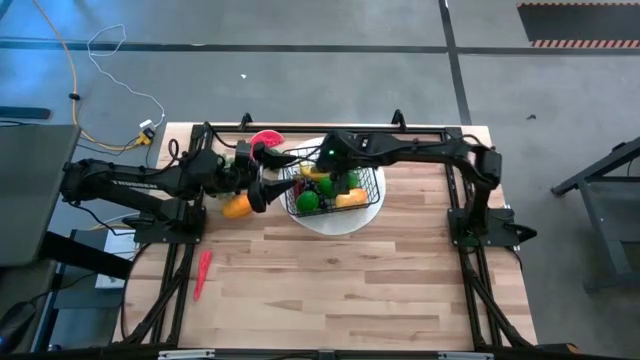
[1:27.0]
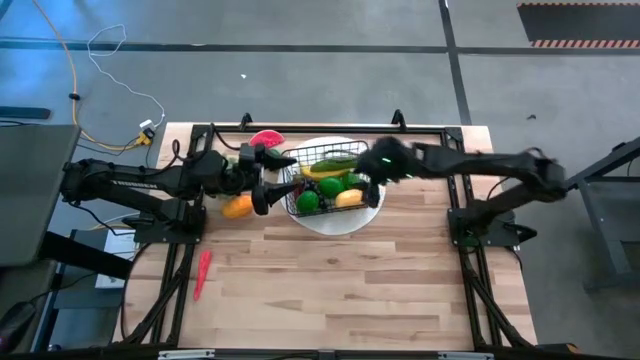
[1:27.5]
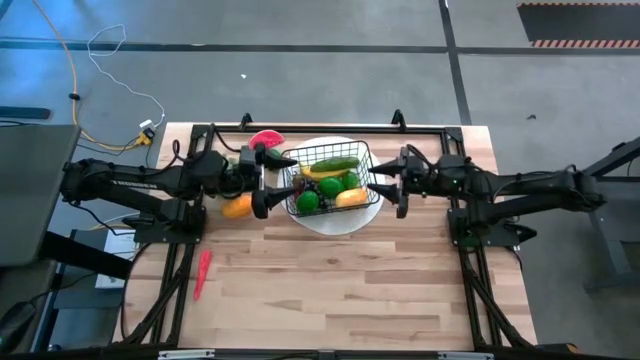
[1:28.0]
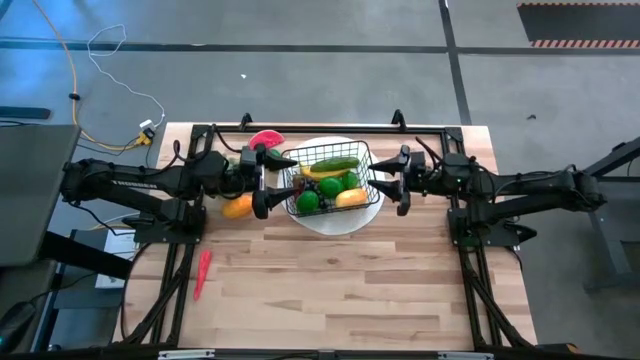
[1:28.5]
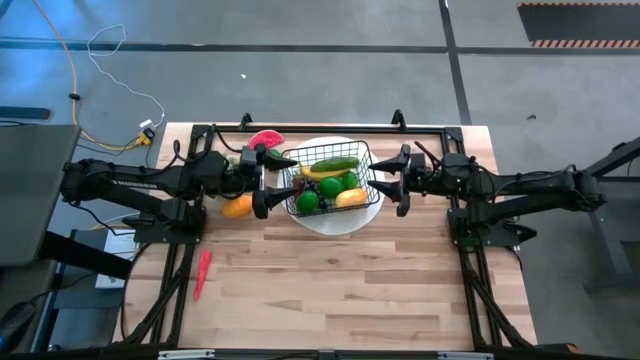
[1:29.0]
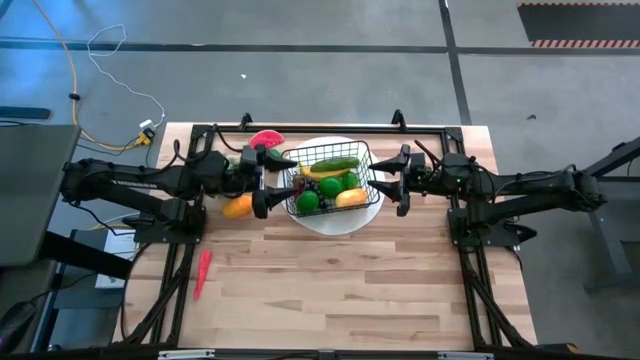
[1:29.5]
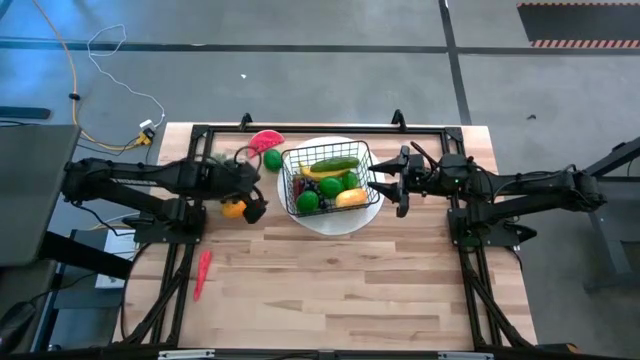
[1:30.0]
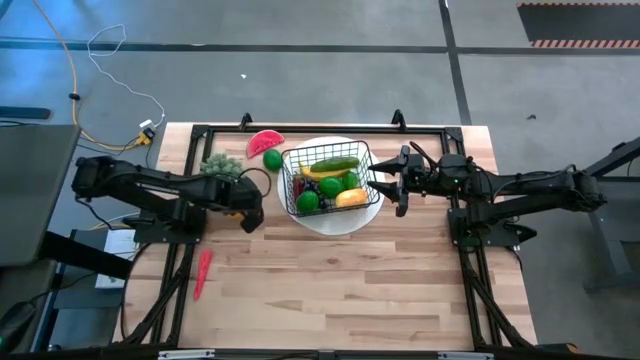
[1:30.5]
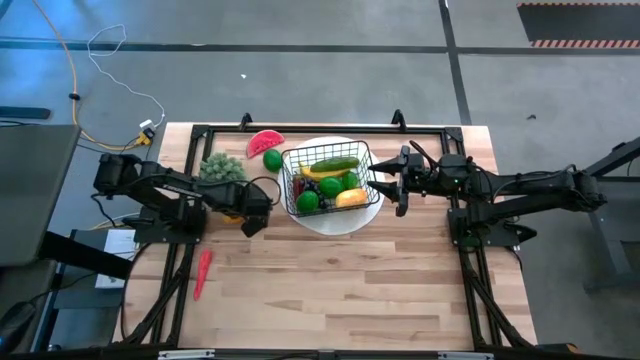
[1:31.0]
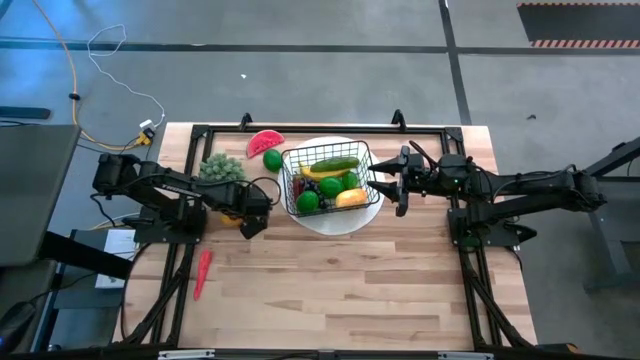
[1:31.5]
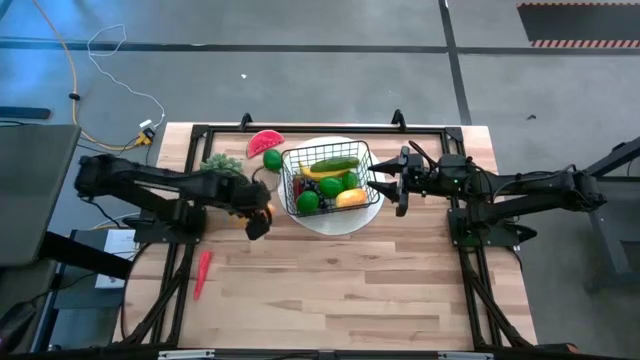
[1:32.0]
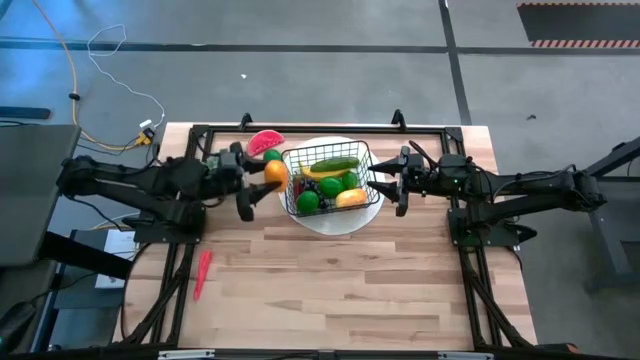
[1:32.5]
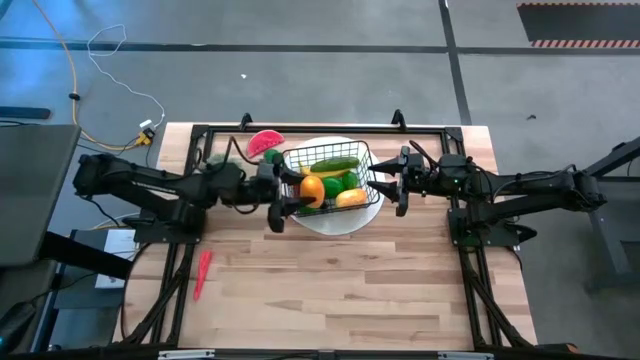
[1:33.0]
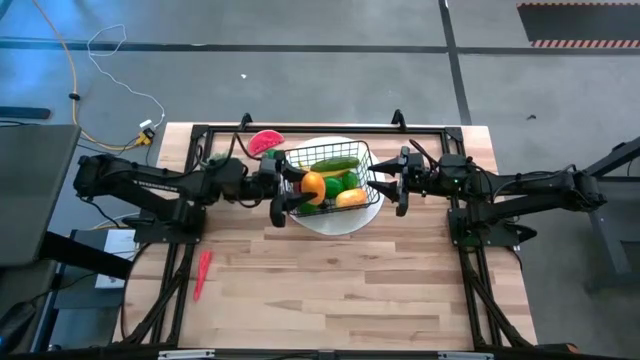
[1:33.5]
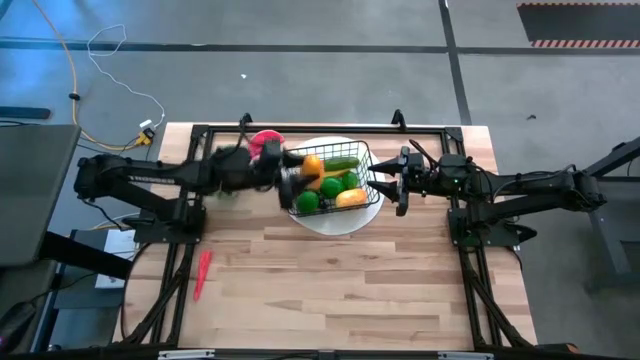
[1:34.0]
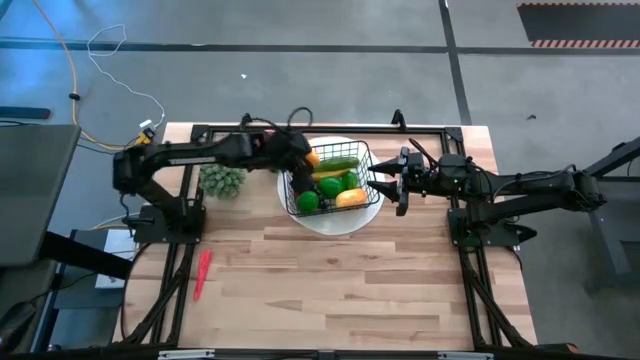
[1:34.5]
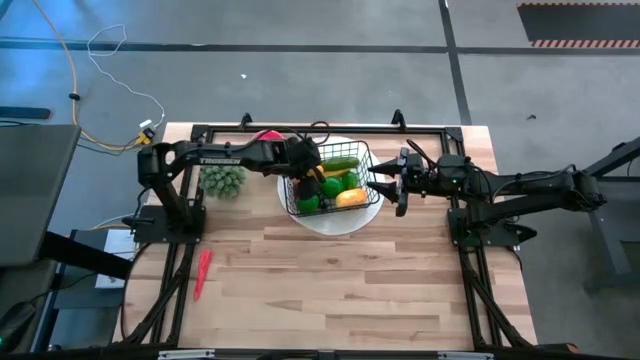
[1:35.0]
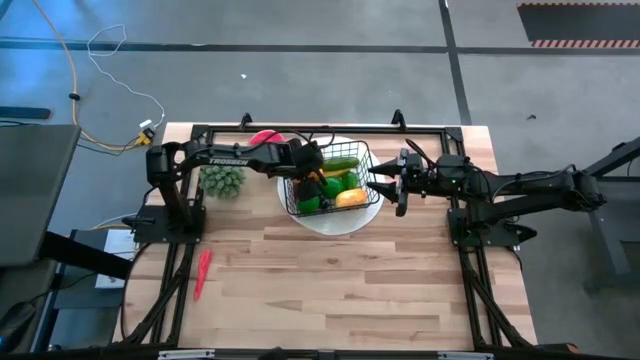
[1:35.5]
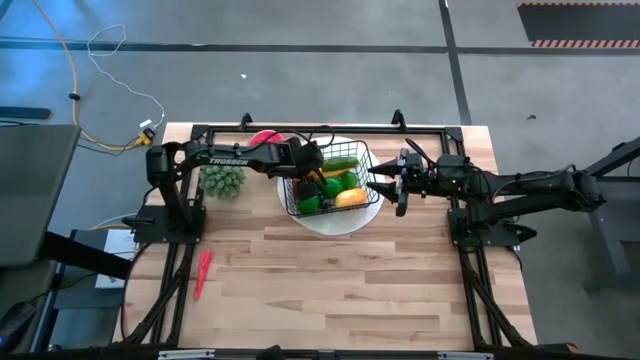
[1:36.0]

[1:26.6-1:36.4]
Task: Build produce basket
Put the yellow mango into the black wire basket

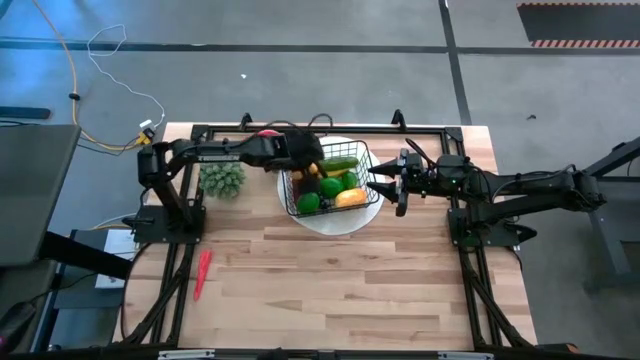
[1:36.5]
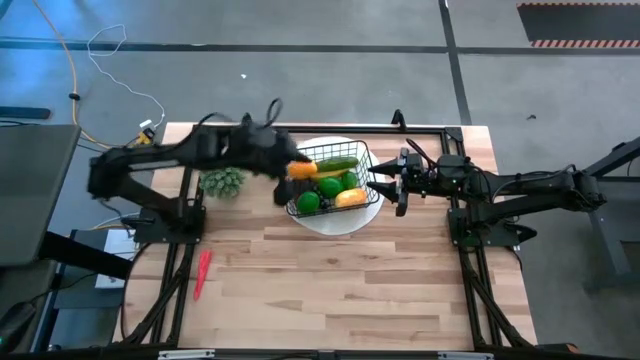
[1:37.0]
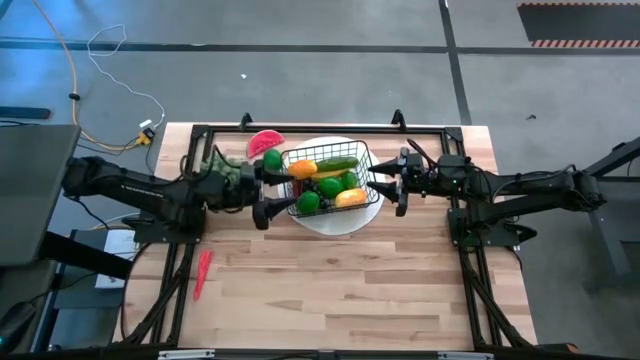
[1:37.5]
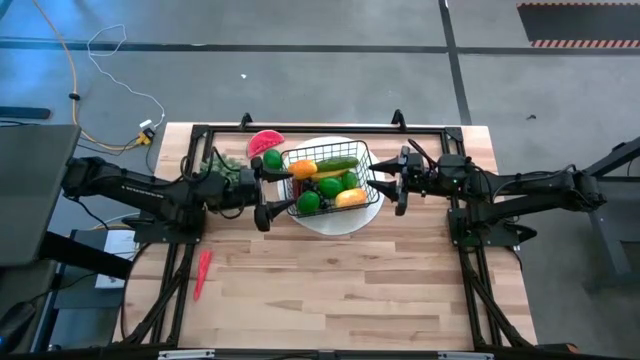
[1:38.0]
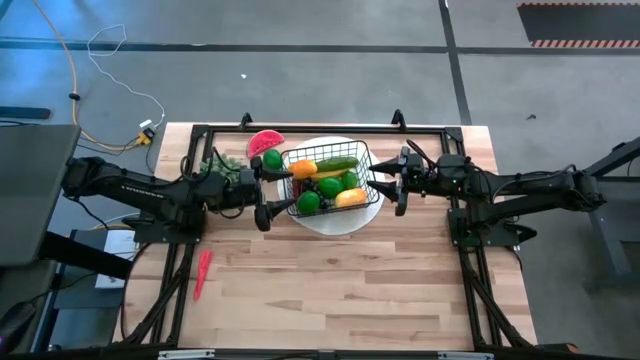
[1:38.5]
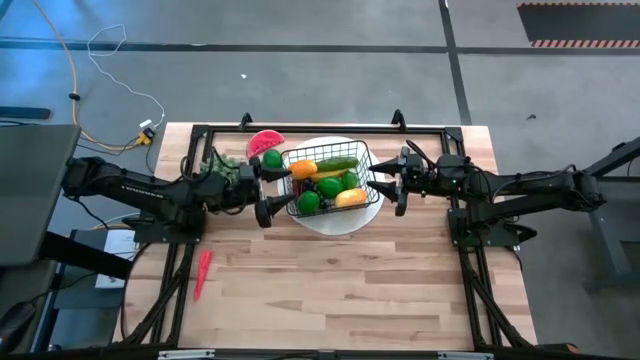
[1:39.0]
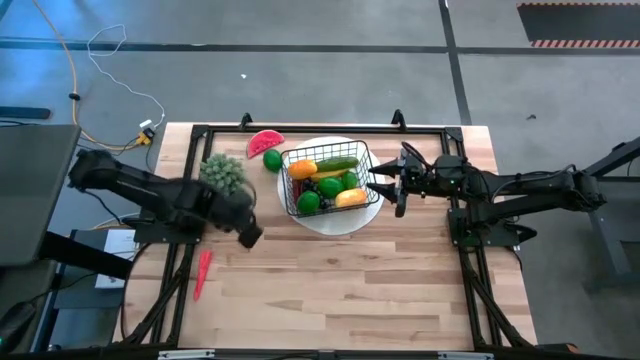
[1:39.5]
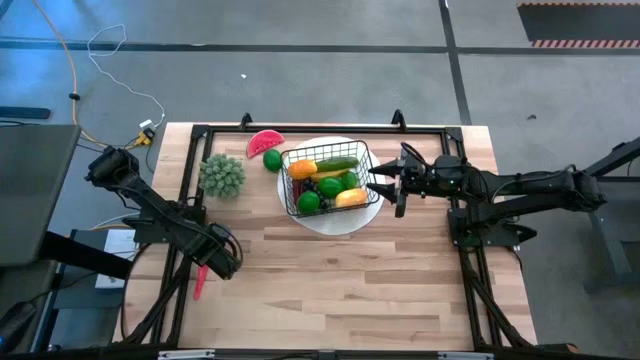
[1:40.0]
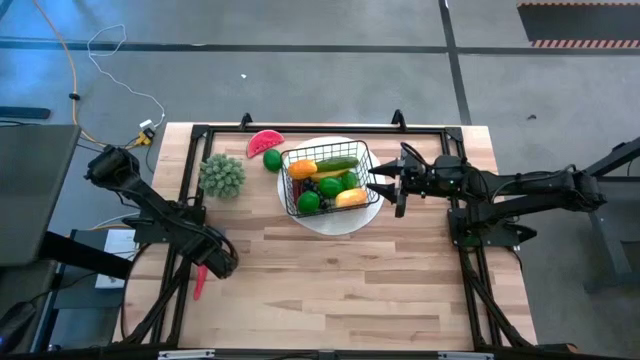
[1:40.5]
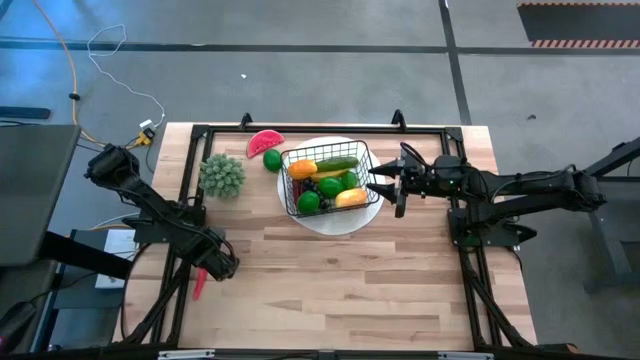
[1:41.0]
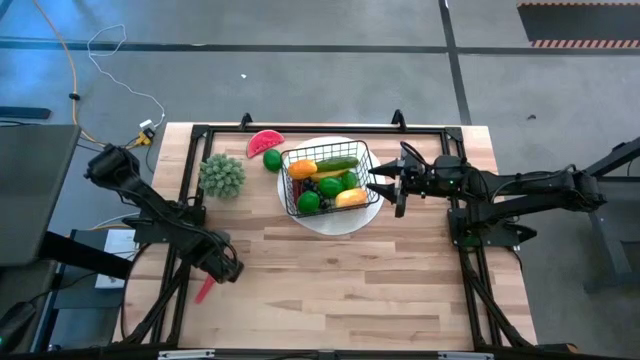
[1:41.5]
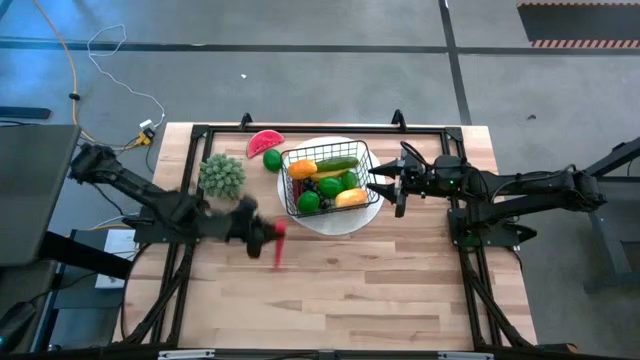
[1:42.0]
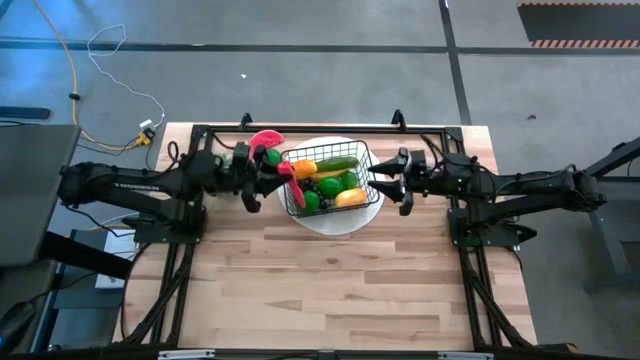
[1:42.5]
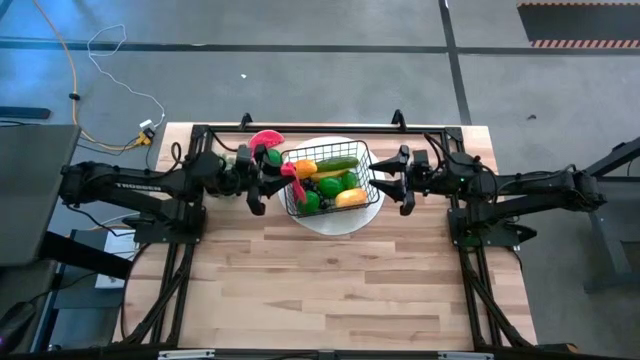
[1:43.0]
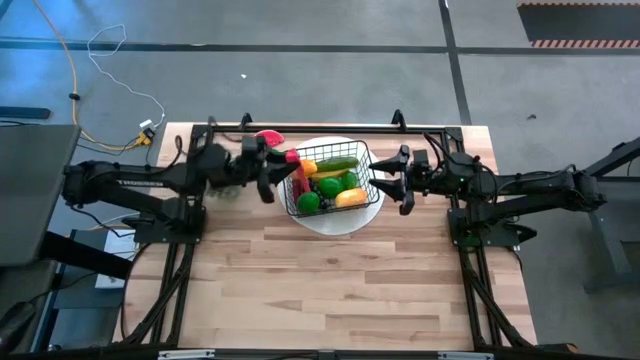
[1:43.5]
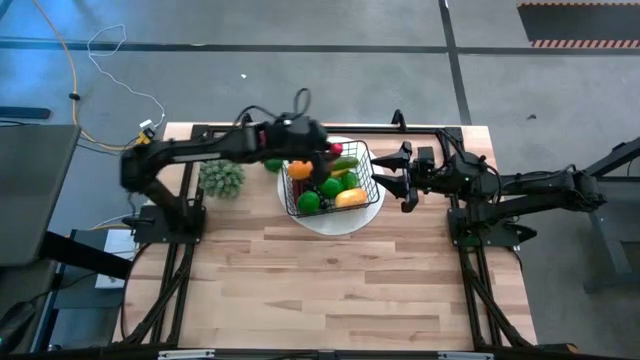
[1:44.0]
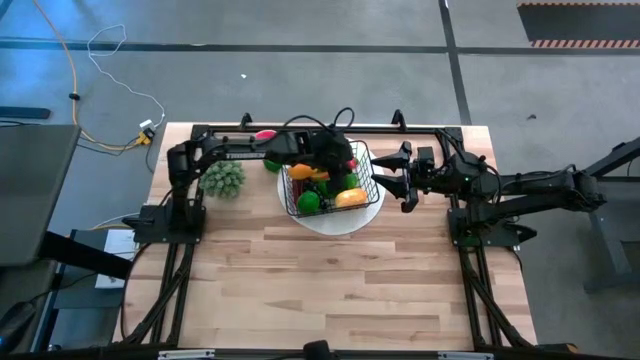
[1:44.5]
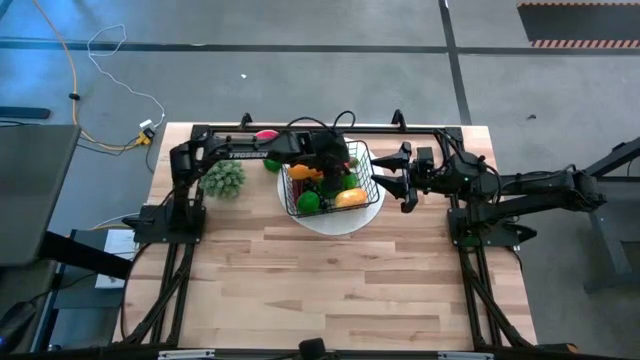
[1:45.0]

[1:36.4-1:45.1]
Put the orange carrot into the black wire basket

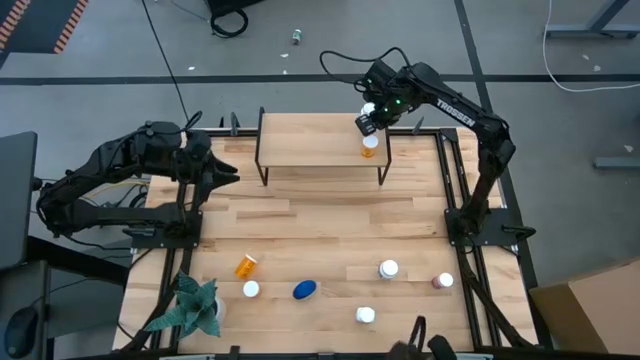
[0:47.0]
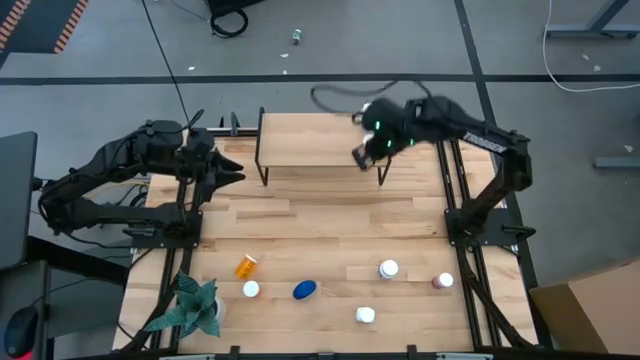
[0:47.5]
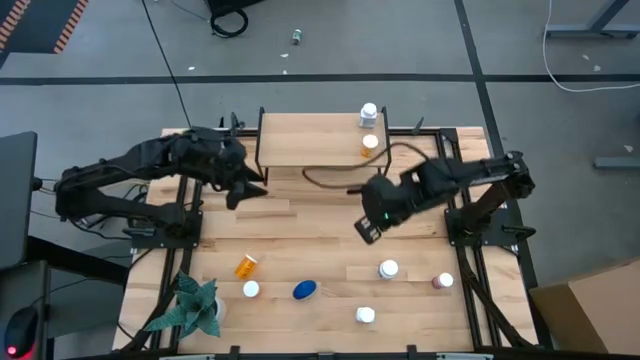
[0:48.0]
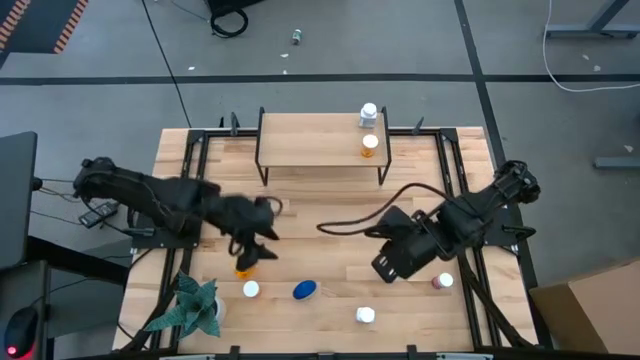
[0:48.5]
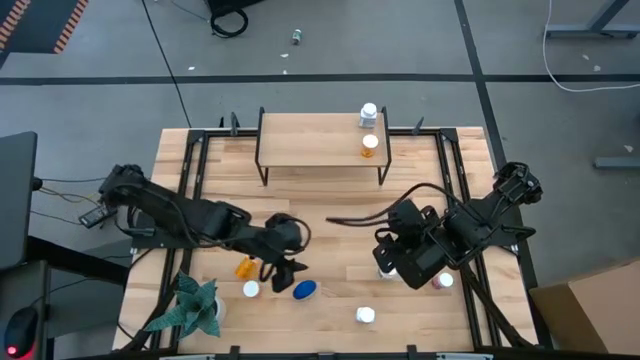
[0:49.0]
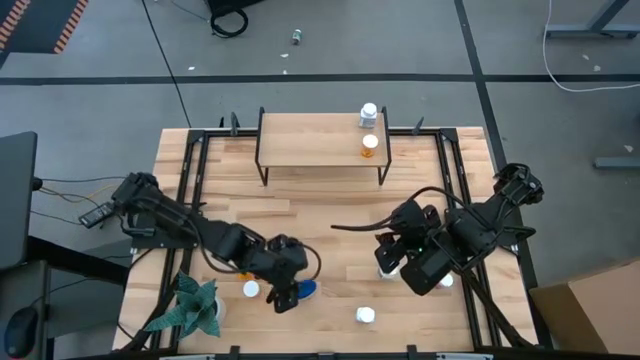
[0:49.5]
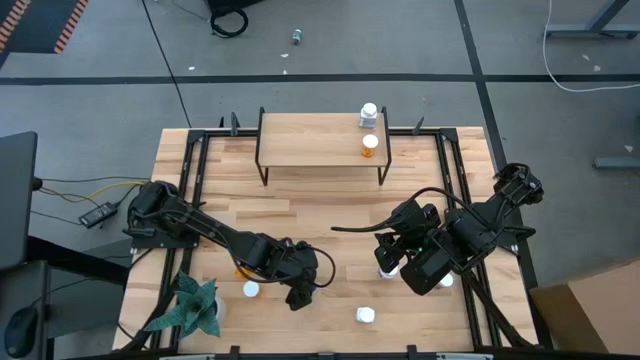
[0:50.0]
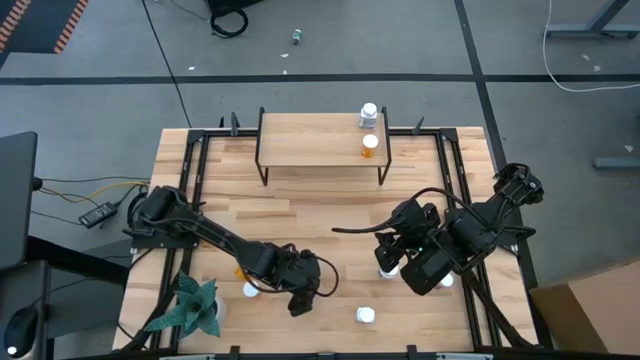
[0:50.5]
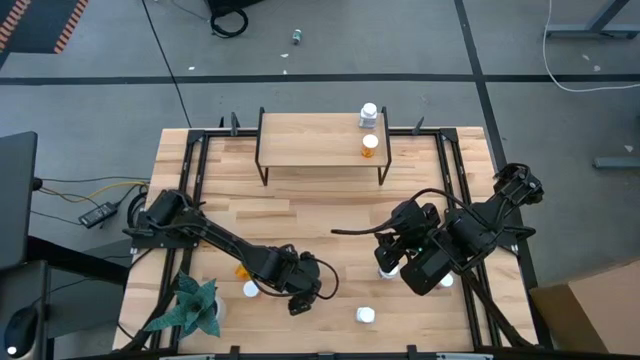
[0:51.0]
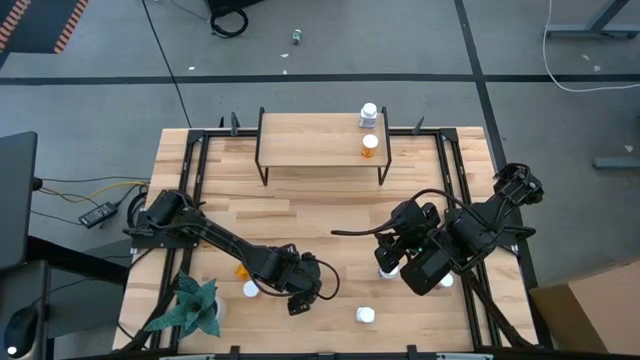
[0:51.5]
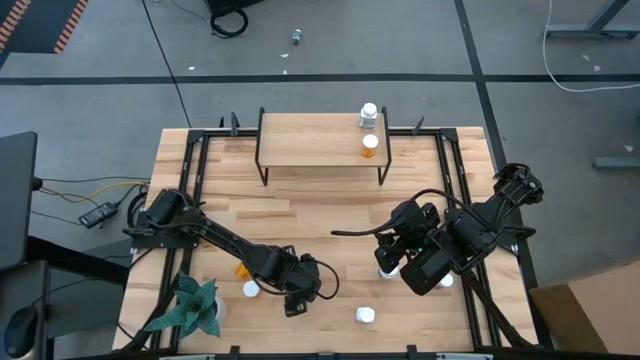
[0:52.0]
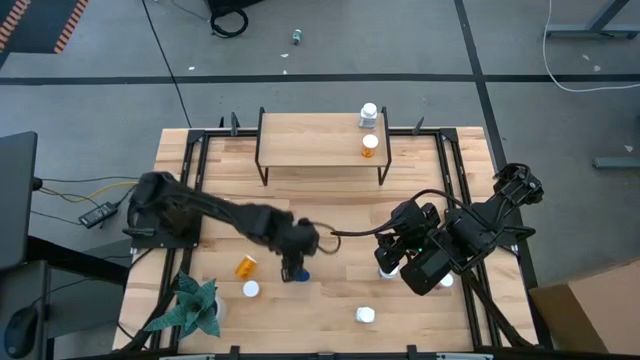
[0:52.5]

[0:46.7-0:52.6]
Task: Pick and place medicine bottles onto shelf by color
Put the transparent pill bottle on the shelf
